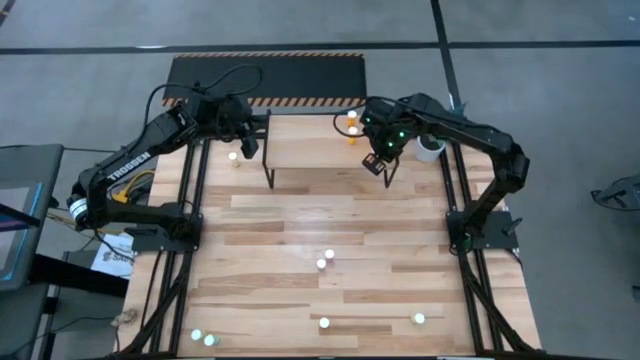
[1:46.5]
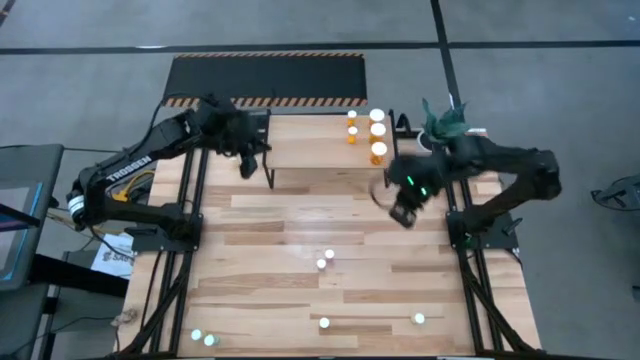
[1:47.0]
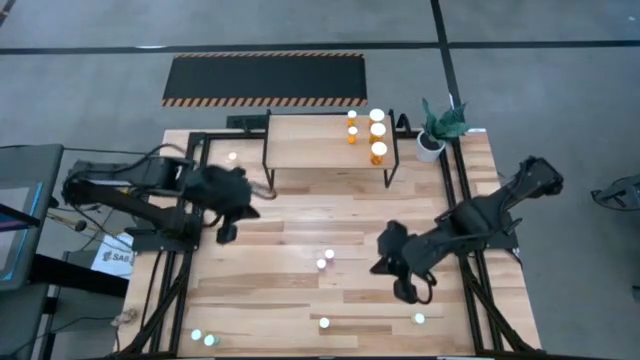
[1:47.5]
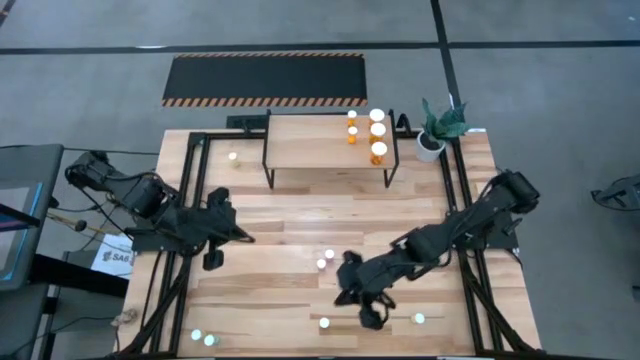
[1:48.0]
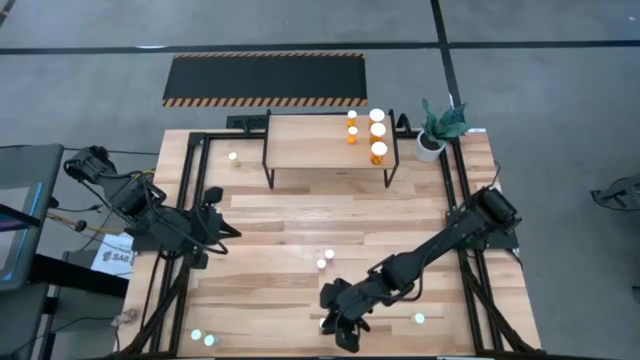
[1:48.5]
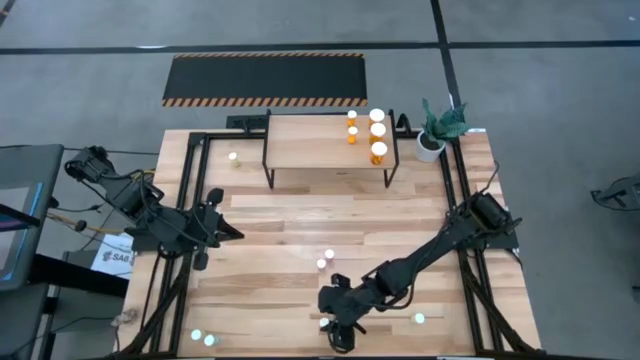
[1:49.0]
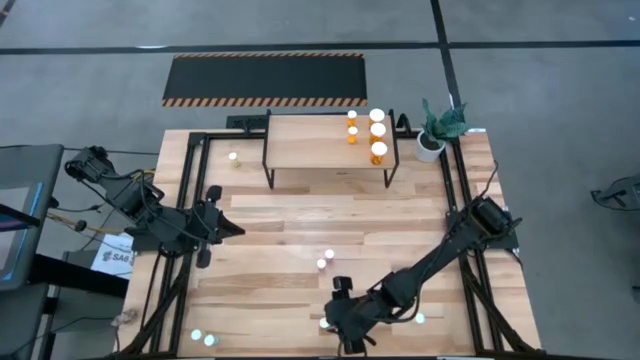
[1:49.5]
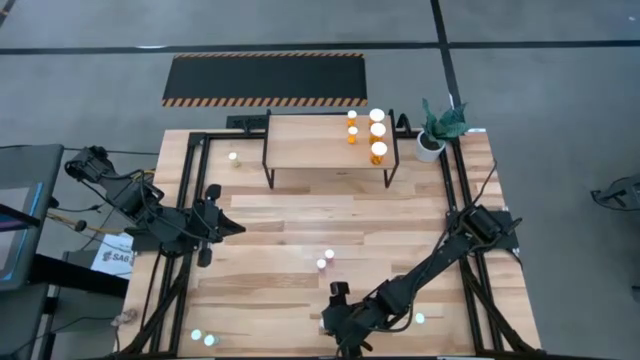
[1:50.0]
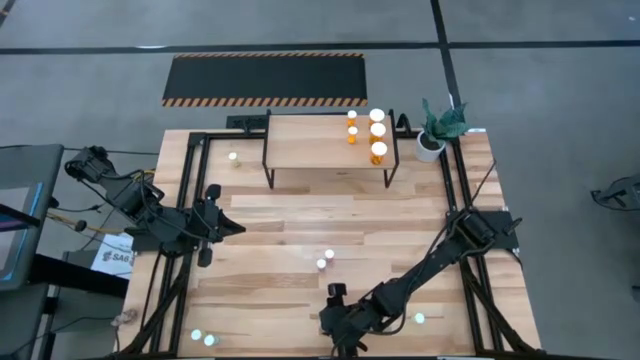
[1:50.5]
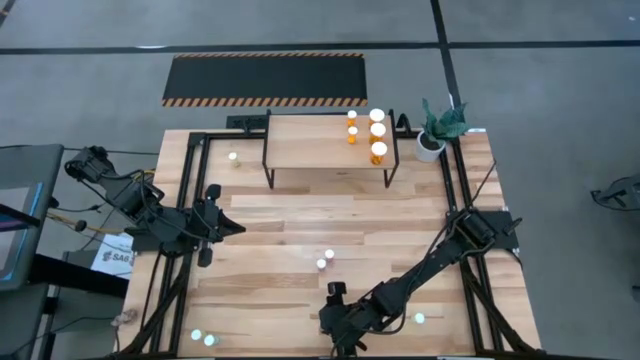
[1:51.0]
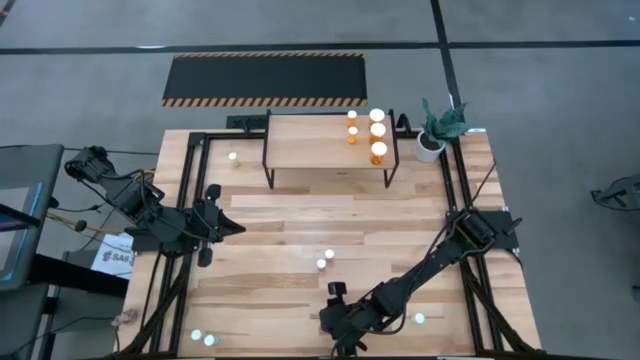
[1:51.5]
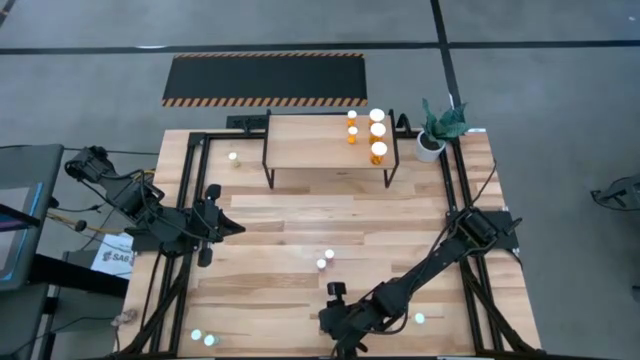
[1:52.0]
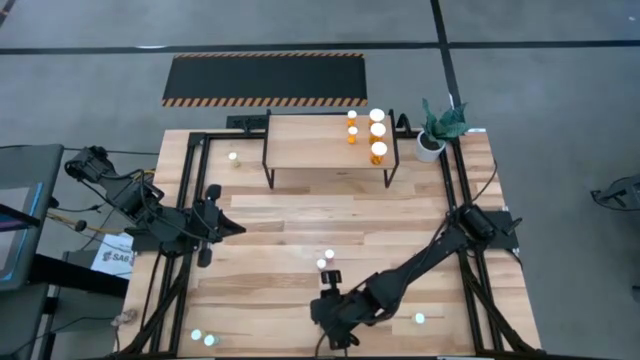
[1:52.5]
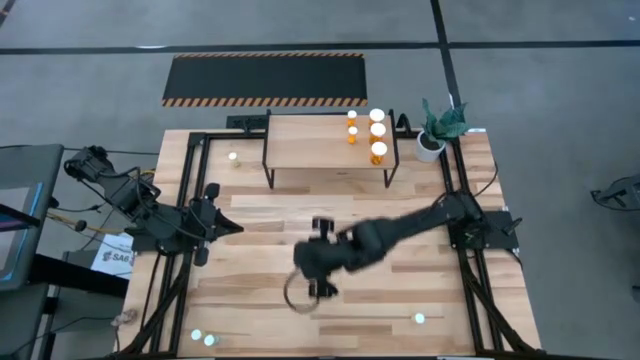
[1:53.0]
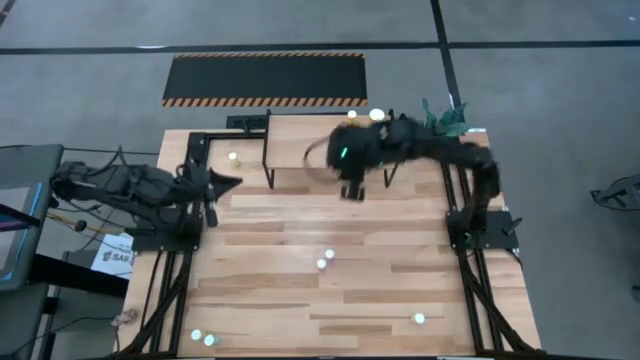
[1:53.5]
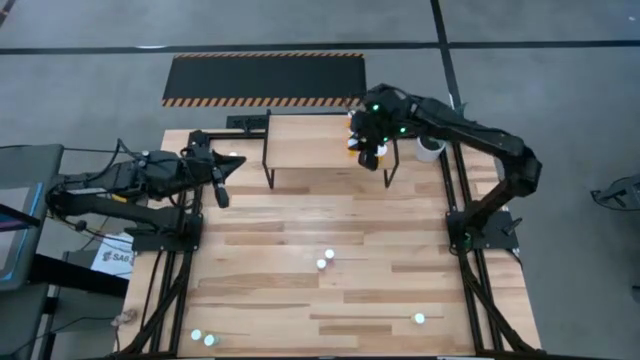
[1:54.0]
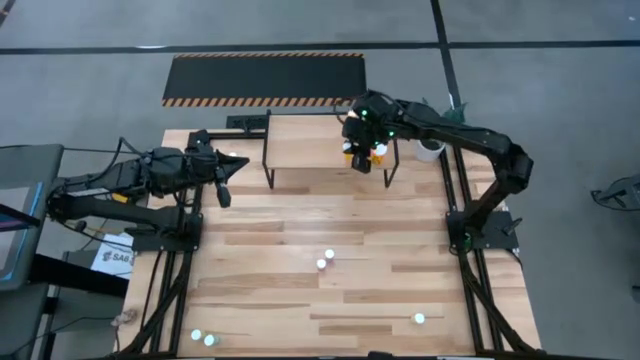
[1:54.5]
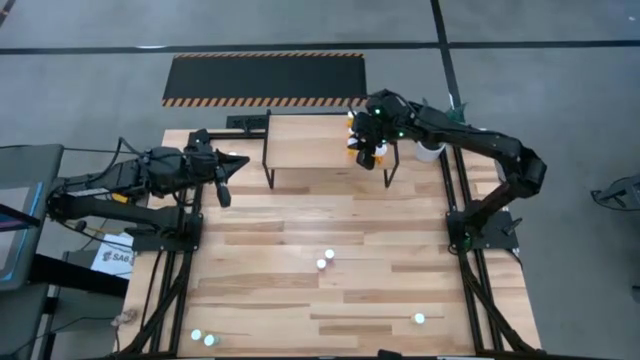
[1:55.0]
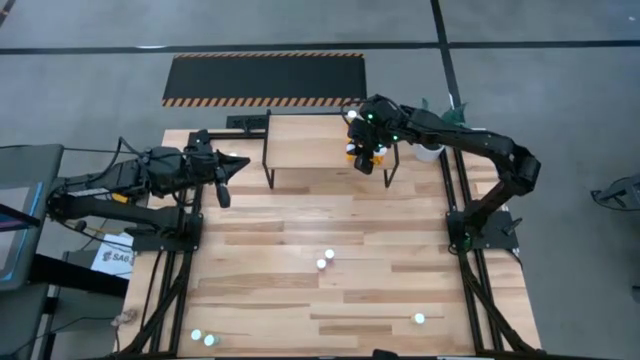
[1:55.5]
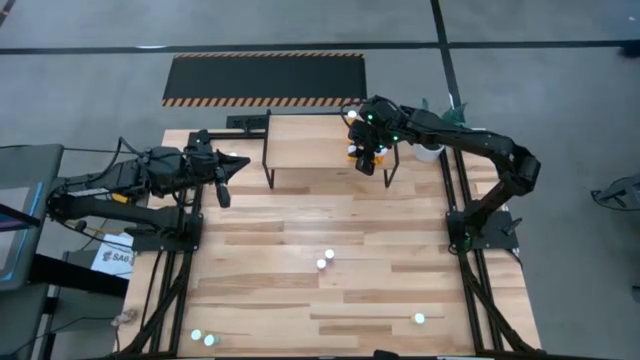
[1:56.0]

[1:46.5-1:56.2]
Task: Pick and place medicine bottles onto shelf by color
Put the small orange pill bottle on the shelf aligned with the other small orange pill bottles

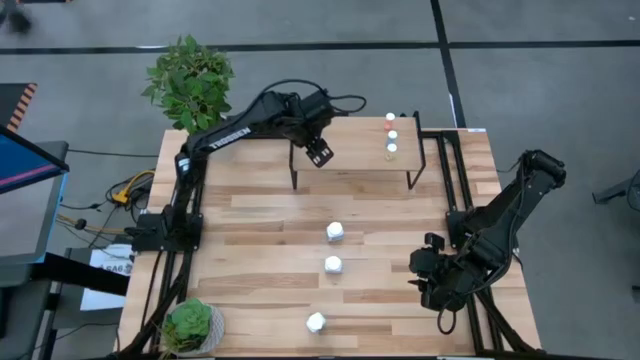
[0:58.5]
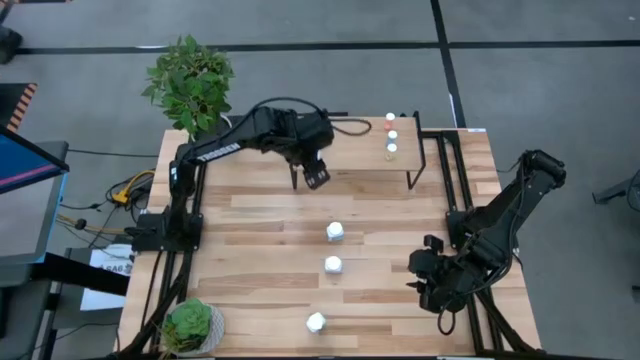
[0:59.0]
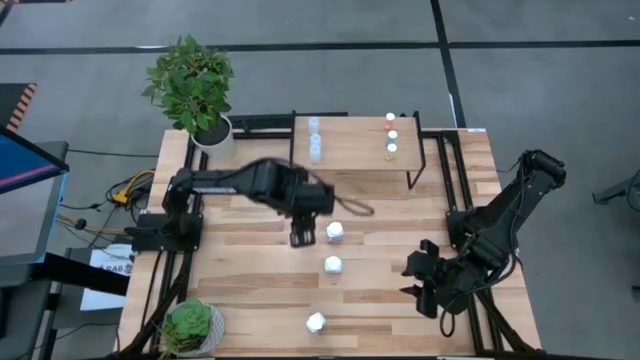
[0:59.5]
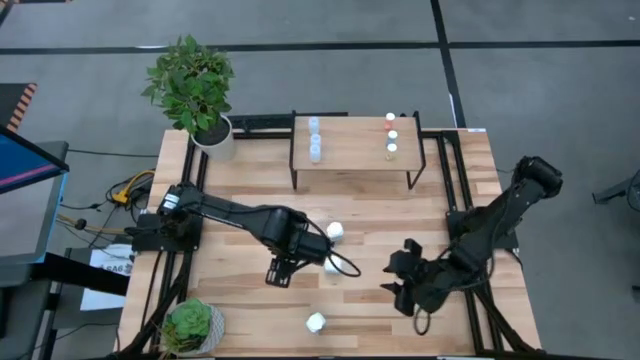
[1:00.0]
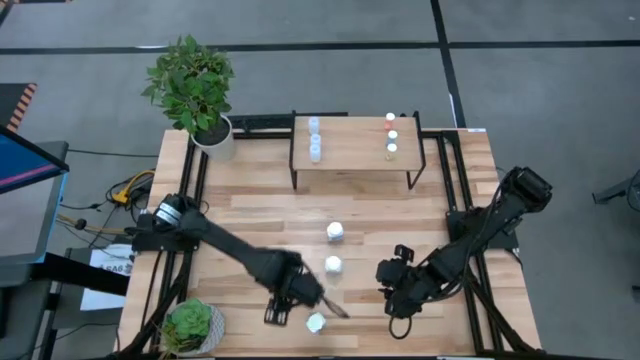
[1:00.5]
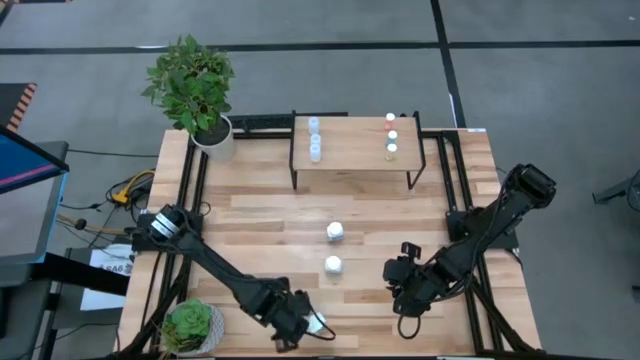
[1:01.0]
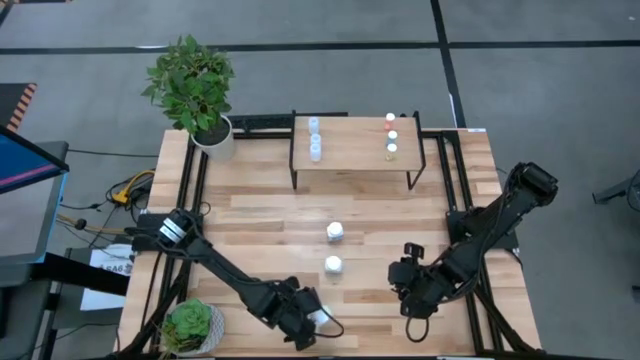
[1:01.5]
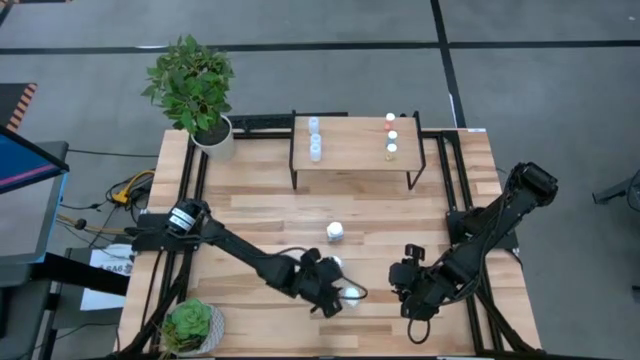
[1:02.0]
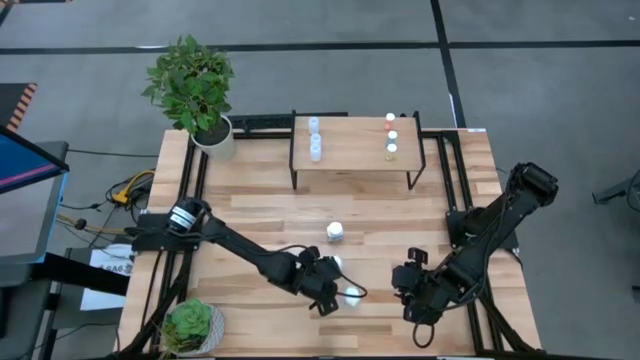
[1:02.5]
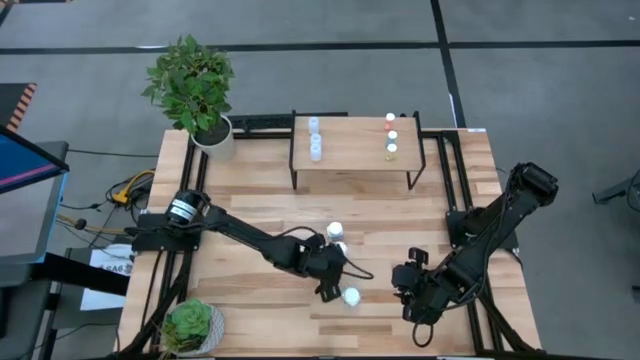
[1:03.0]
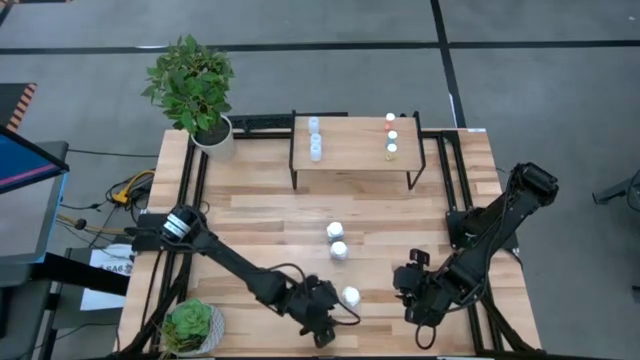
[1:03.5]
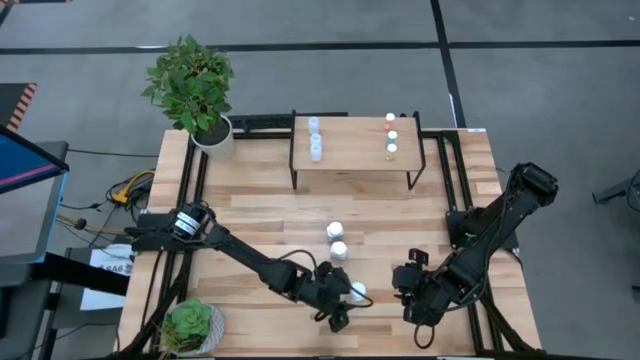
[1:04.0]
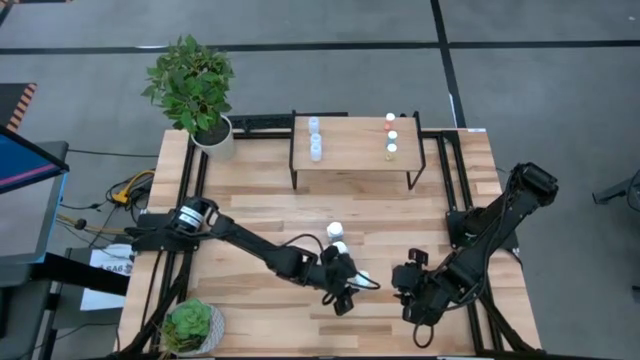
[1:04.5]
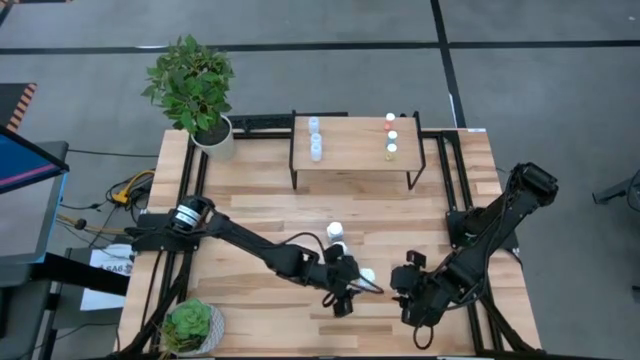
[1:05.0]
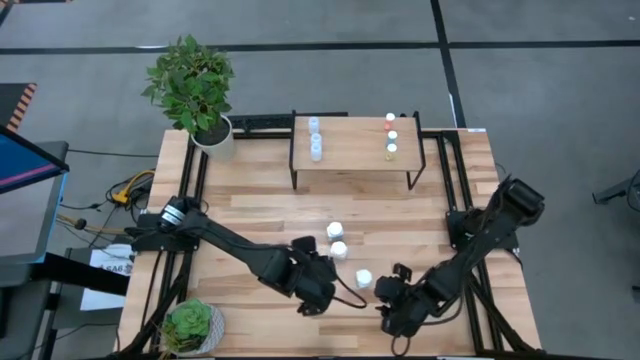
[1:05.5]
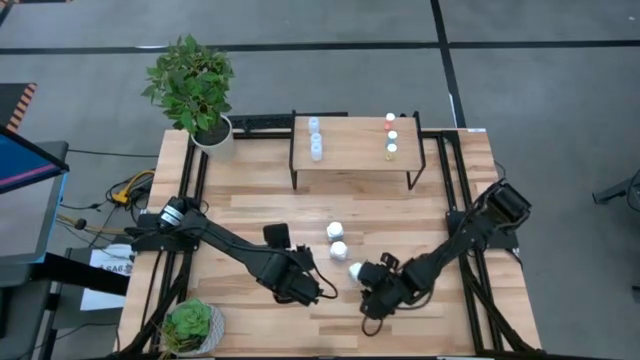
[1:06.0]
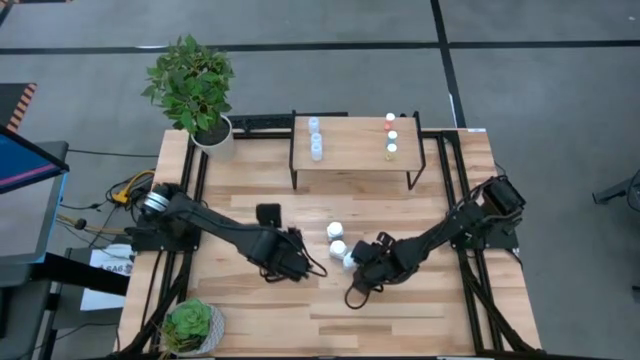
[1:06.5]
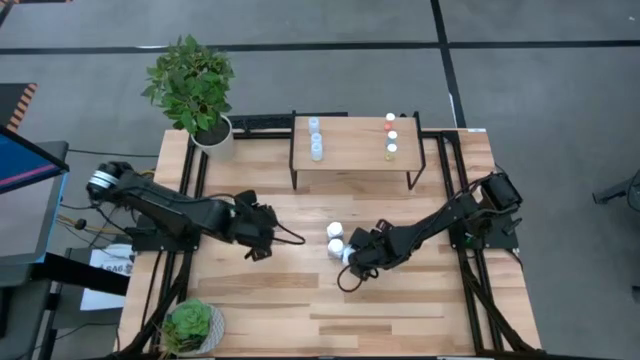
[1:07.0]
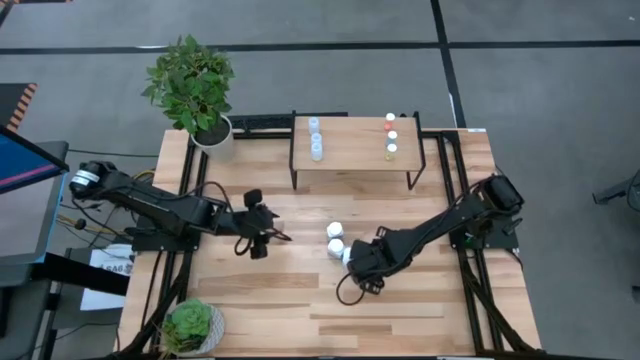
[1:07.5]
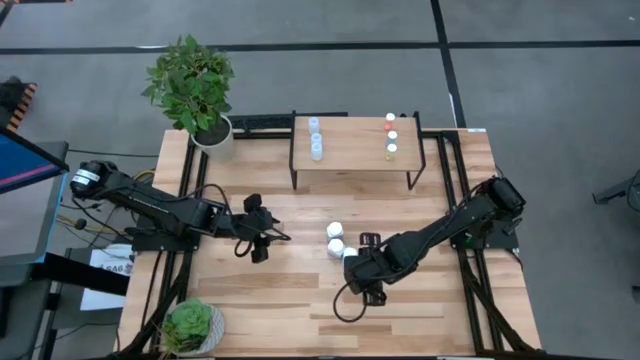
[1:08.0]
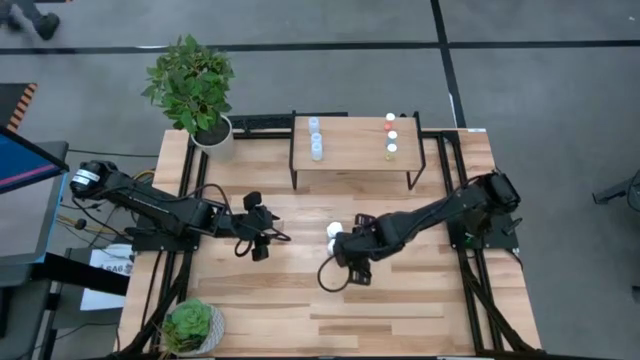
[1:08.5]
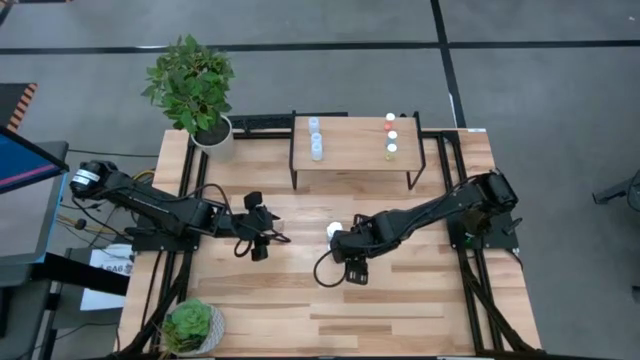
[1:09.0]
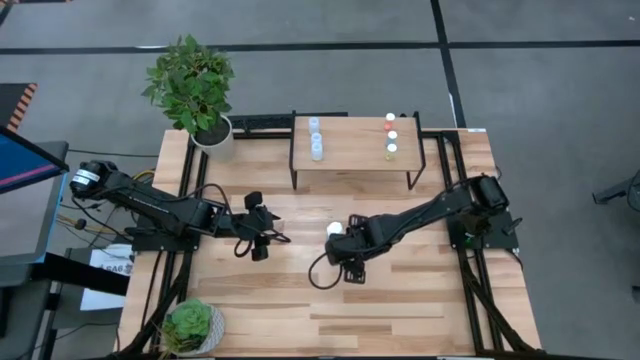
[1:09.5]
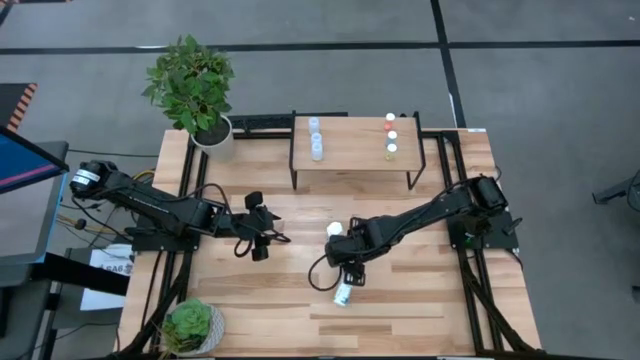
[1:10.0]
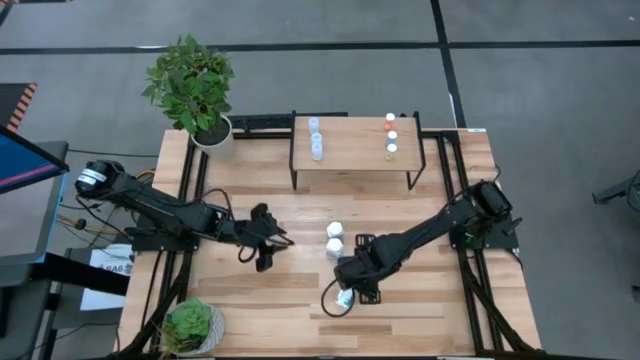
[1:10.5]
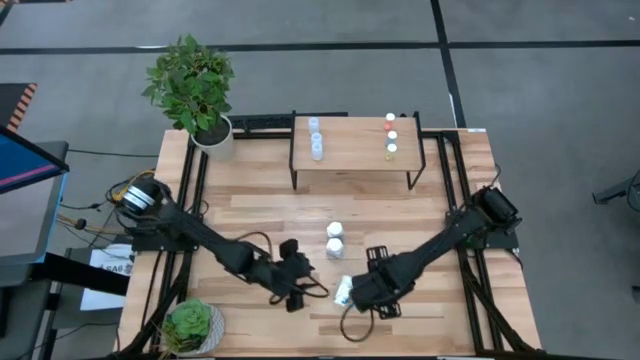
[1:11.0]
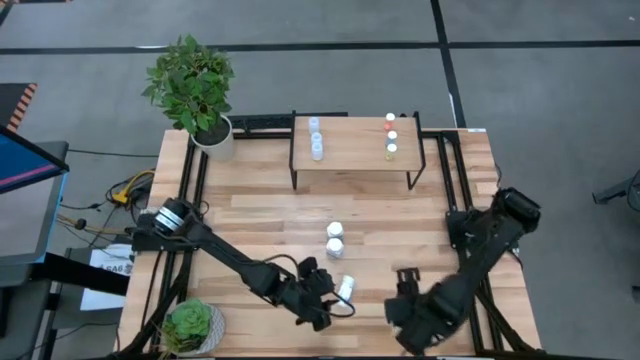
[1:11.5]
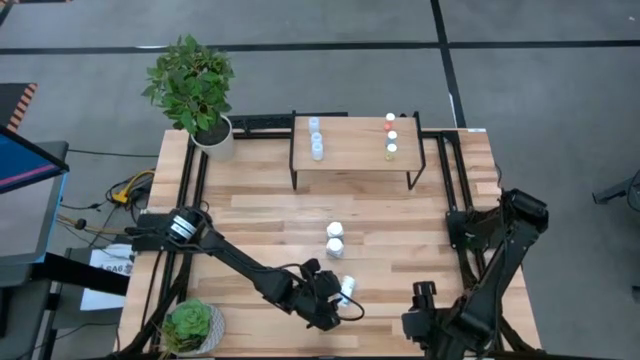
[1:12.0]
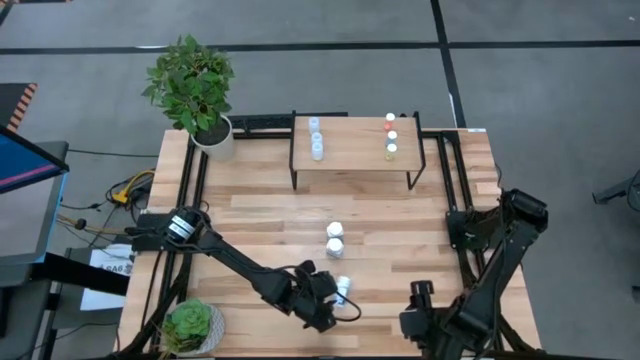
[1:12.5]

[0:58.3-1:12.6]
Task: Pick and place medicine bottles onto shelf by color
Put the bottom white pill bottle on the shelf
